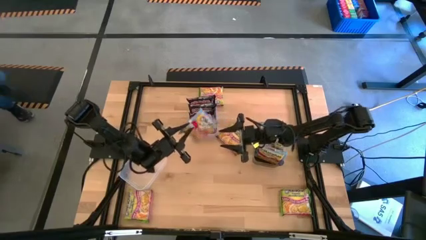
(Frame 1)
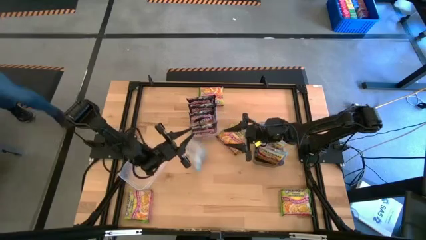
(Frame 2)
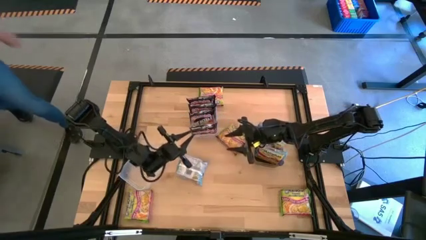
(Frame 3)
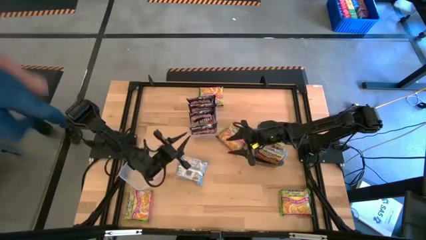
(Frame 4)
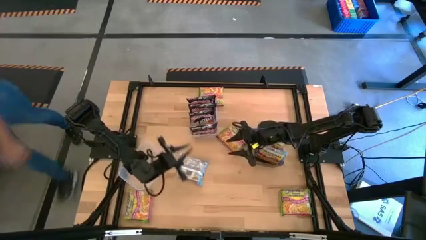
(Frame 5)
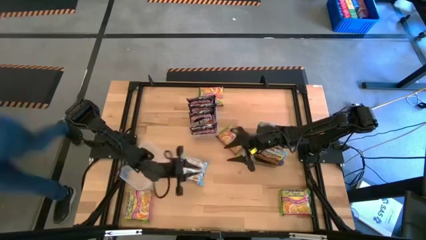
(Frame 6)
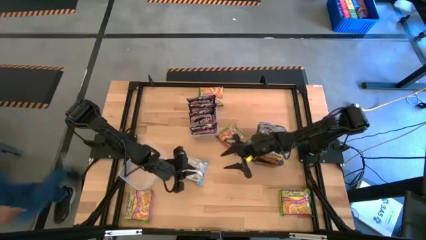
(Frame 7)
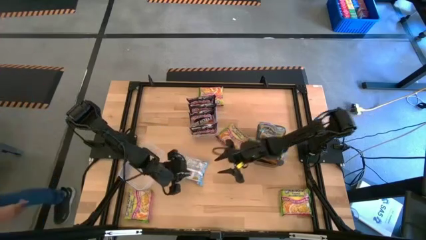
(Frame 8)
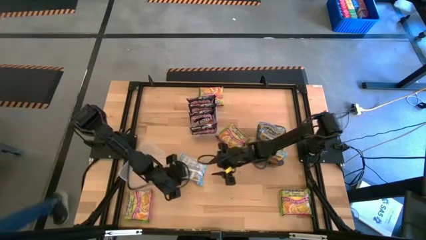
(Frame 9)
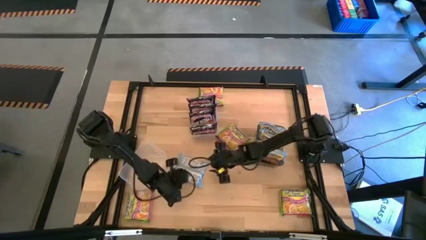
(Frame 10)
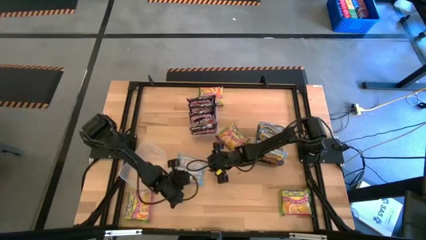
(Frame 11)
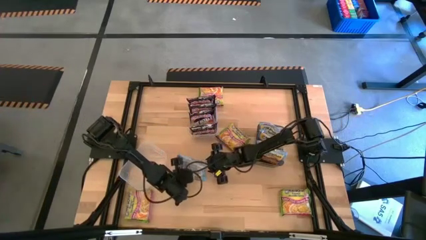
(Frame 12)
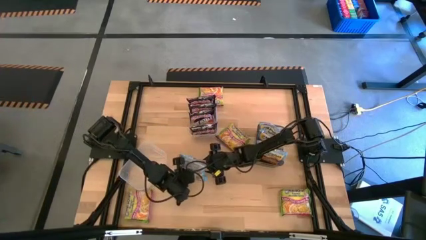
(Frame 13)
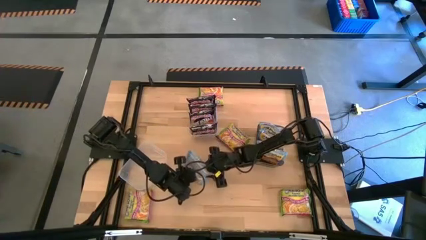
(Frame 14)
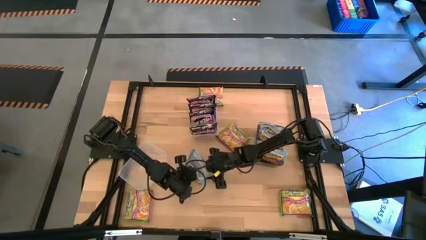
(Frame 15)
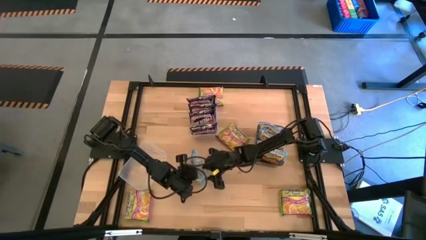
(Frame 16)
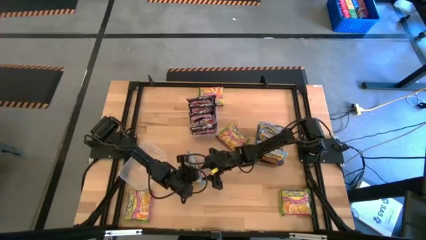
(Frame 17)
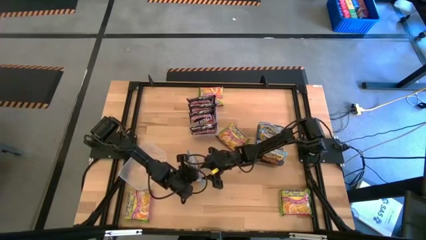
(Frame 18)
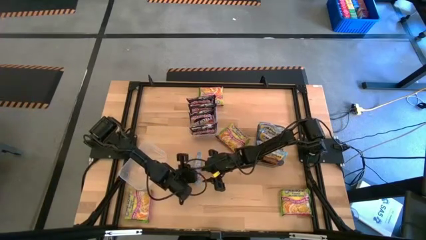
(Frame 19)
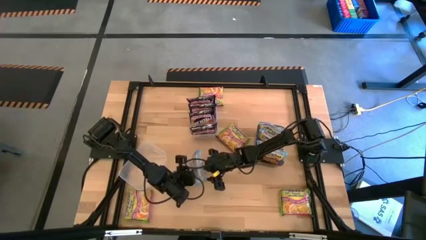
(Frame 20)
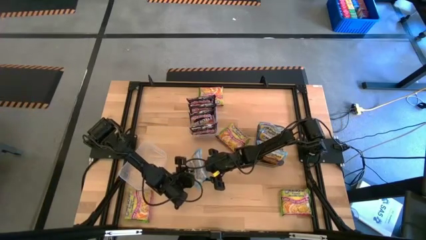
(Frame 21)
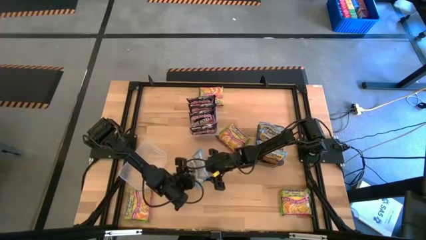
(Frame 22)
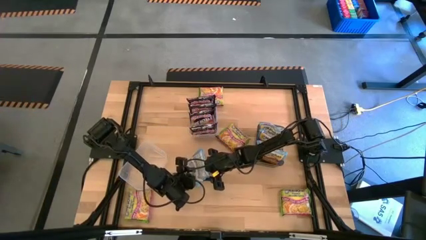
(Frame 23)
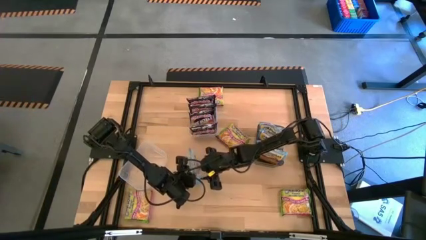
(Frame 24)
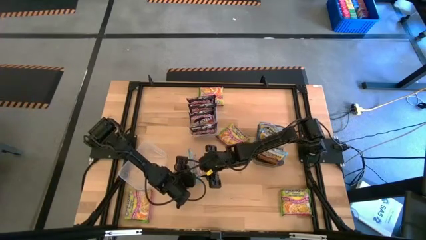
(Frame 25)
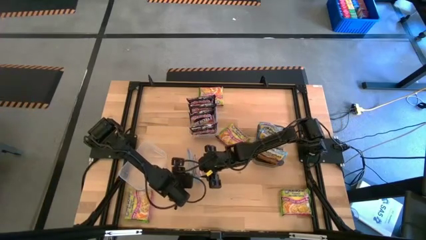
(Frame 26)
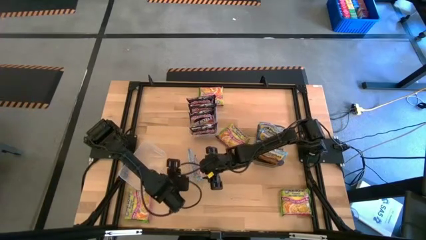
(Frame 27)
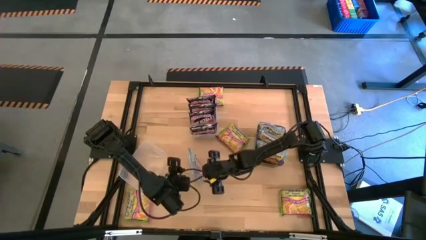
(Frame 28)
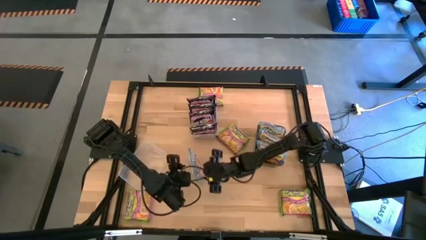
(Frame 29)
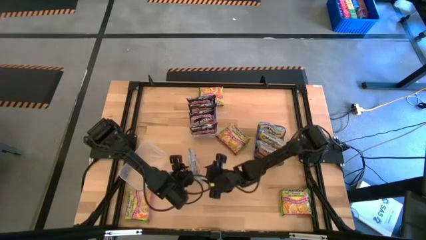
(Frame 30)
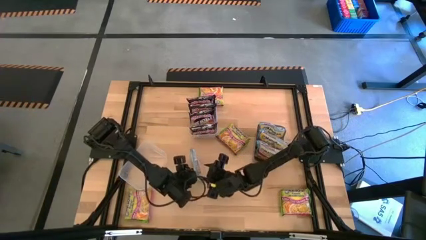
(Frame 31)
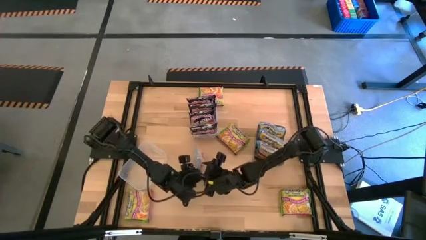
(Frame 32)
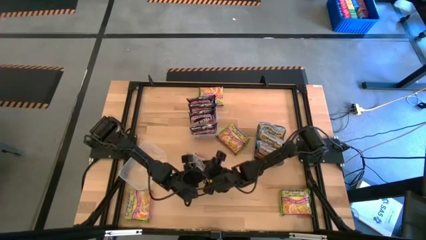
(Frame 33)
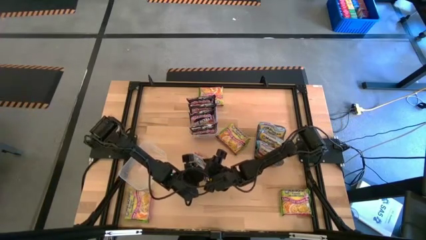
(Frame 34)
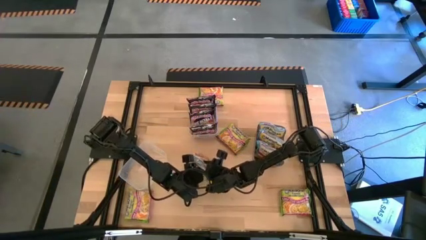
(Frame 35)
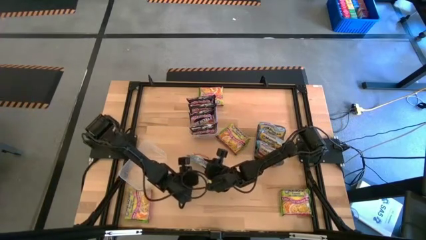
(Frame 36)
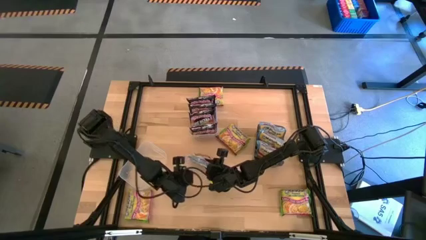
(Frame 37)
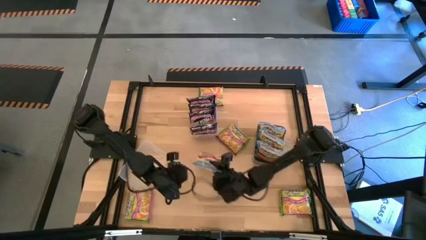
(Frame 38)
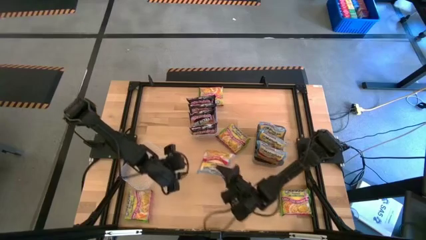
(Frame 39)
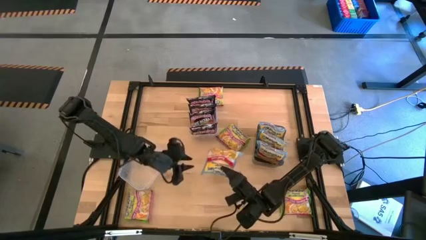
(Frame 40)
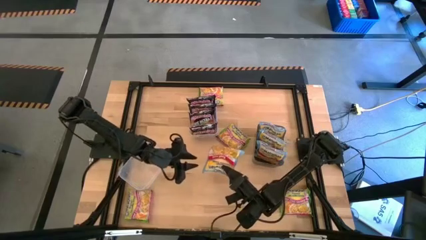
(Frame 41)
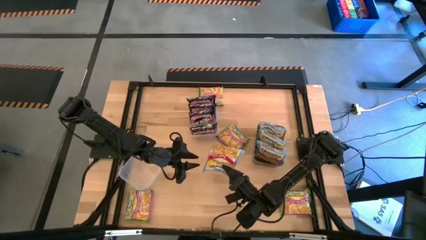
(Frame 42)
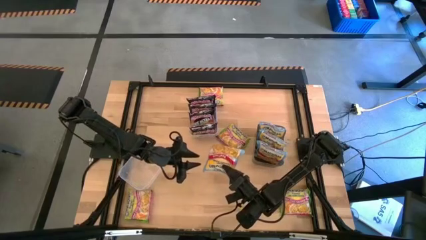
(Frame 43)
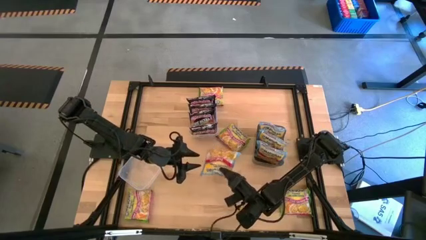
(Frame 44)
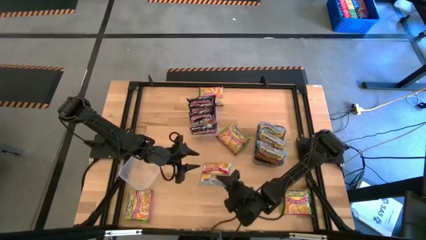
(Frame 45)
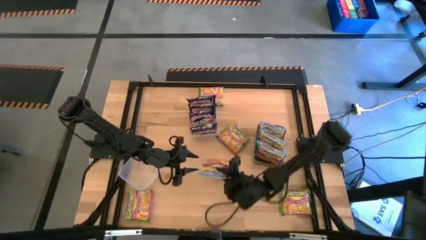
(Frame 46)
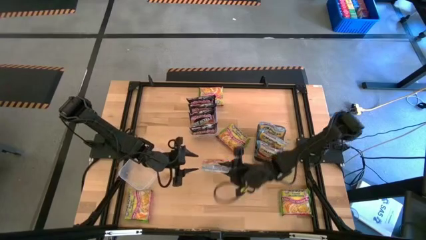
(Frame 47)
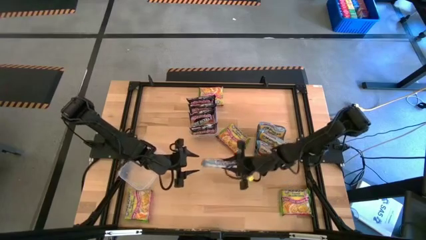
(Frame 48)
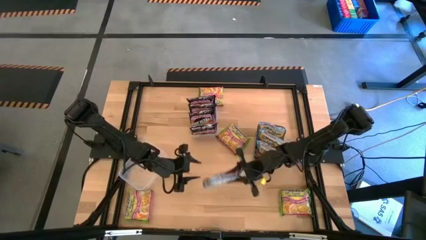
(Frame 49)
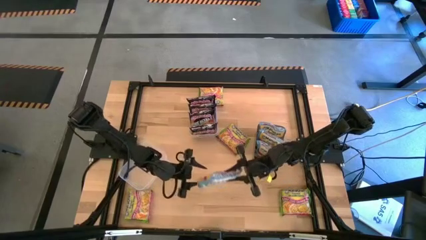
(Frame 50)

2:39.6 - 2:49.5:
Task: Sort Maruchan noodles
Put the blue noodle pack into the black bin

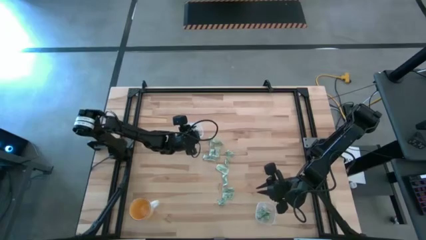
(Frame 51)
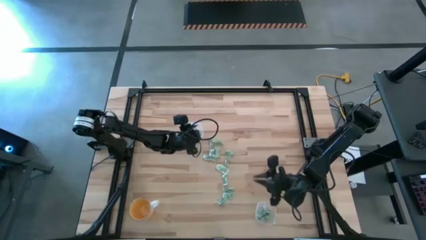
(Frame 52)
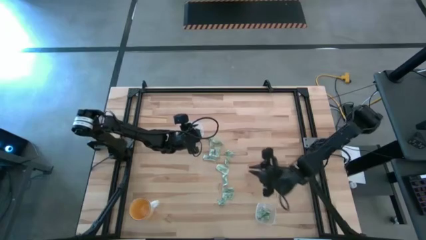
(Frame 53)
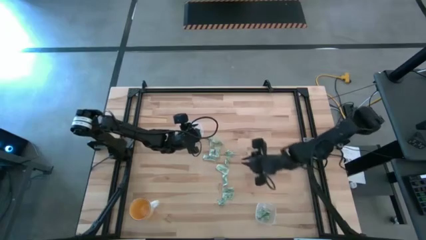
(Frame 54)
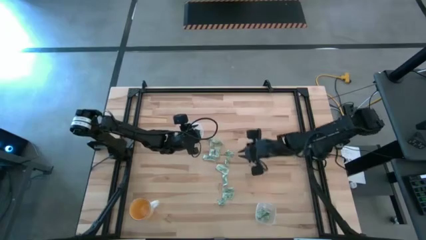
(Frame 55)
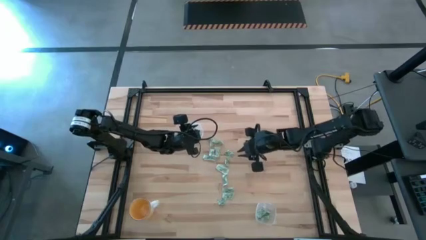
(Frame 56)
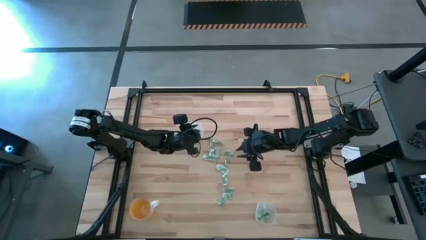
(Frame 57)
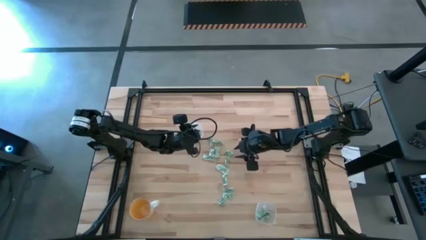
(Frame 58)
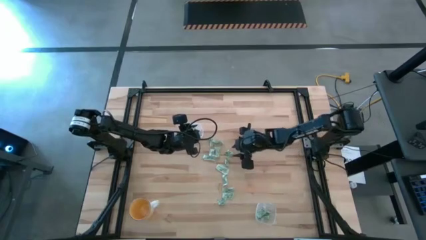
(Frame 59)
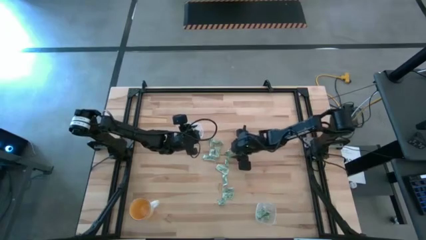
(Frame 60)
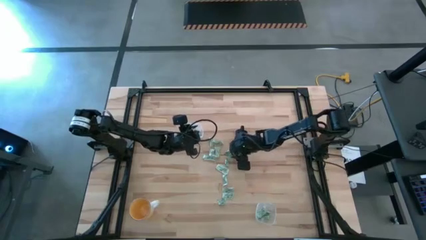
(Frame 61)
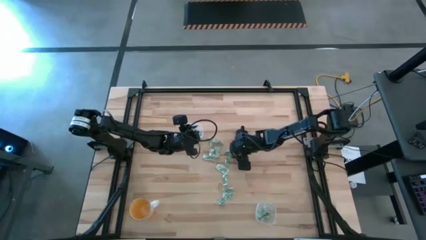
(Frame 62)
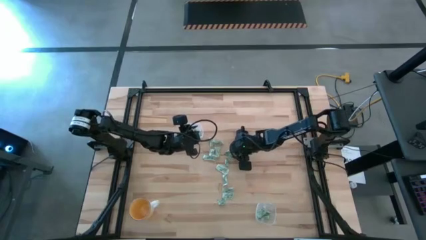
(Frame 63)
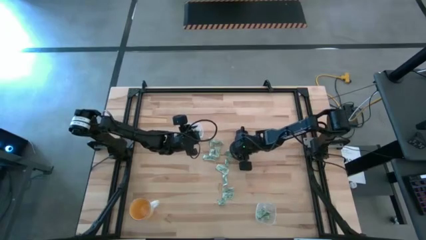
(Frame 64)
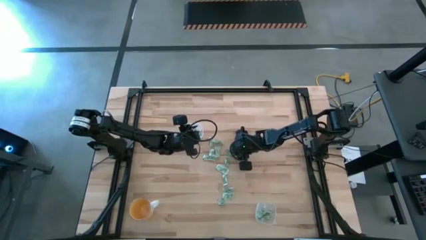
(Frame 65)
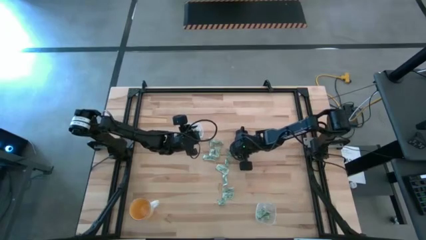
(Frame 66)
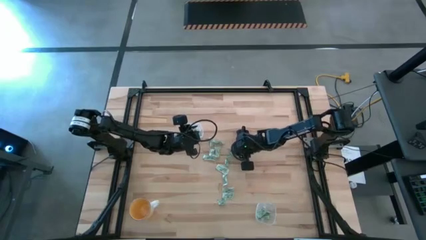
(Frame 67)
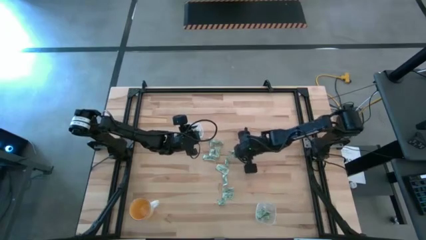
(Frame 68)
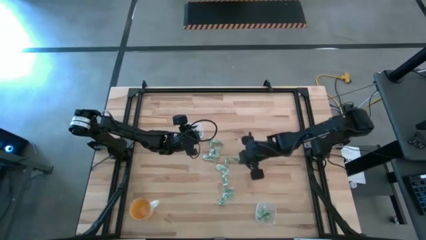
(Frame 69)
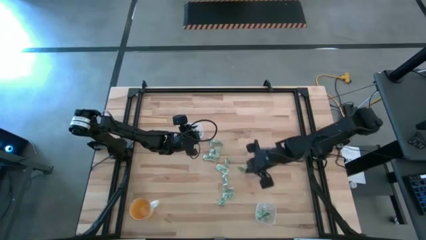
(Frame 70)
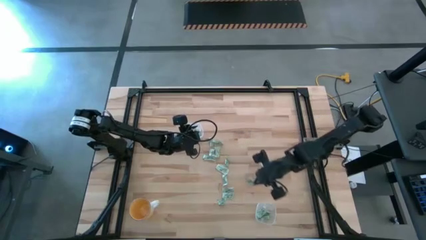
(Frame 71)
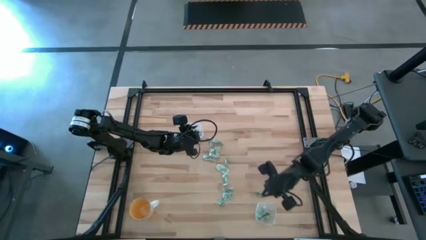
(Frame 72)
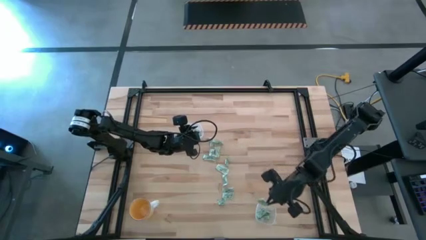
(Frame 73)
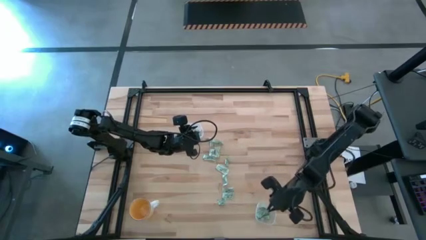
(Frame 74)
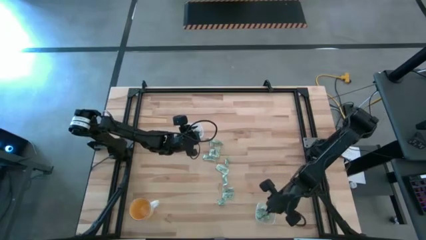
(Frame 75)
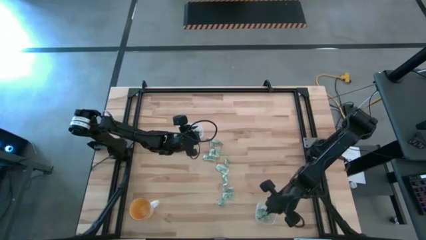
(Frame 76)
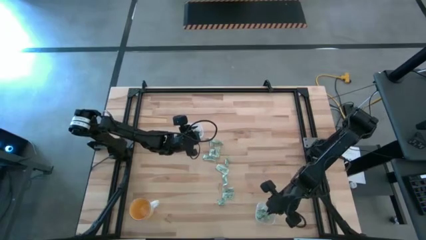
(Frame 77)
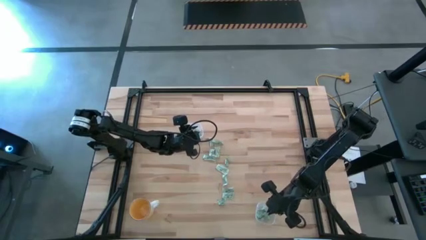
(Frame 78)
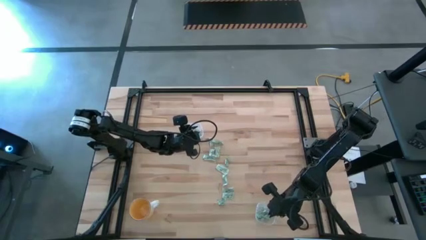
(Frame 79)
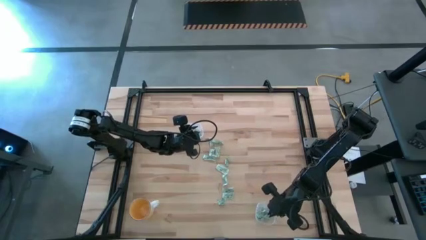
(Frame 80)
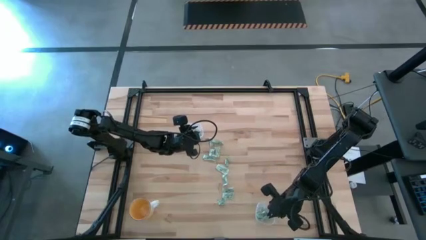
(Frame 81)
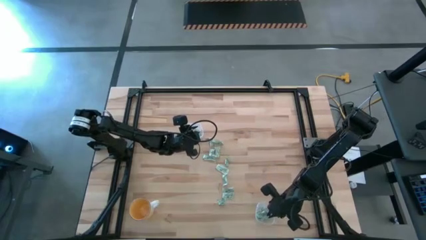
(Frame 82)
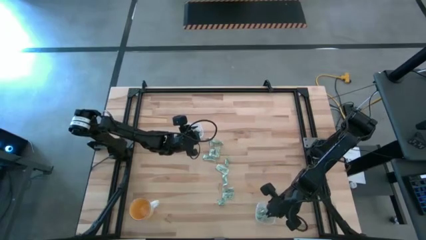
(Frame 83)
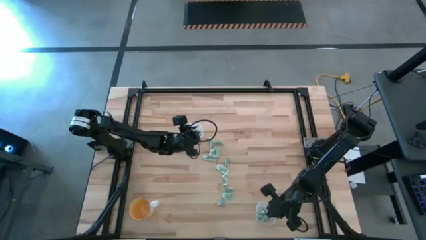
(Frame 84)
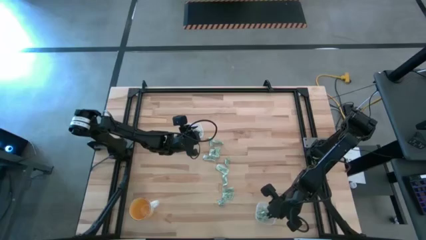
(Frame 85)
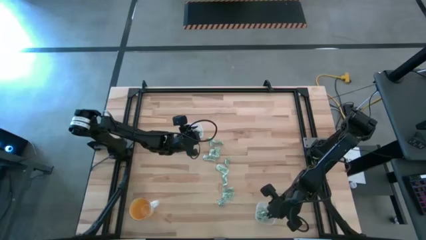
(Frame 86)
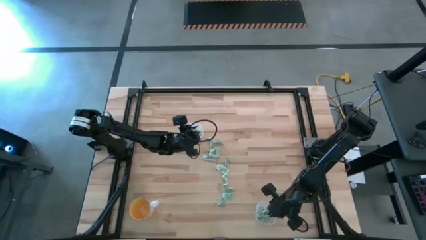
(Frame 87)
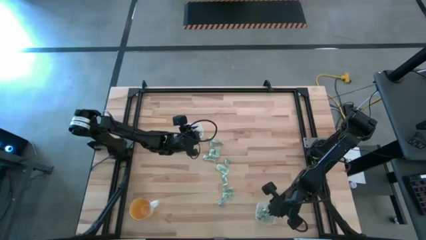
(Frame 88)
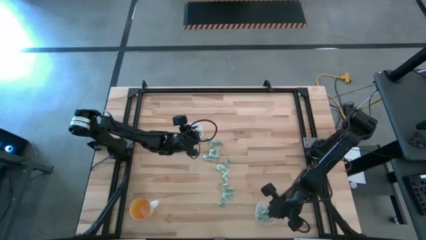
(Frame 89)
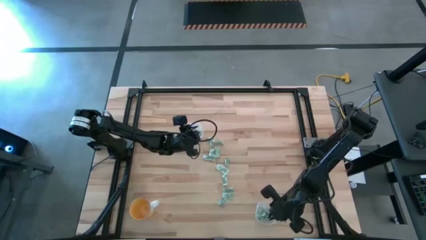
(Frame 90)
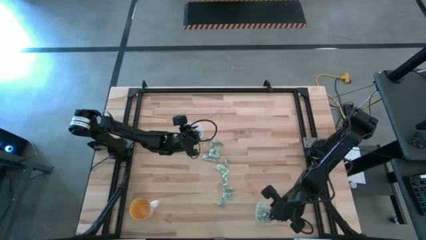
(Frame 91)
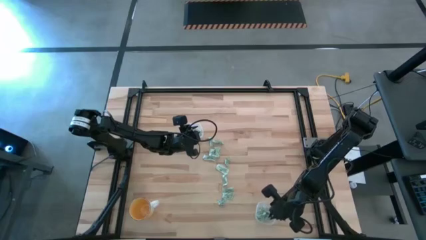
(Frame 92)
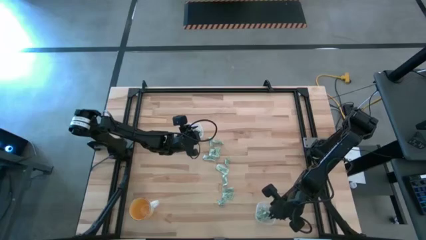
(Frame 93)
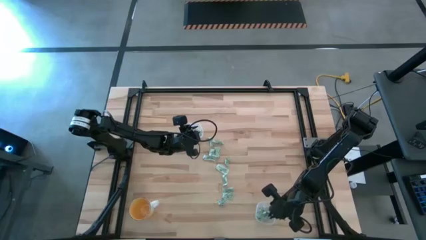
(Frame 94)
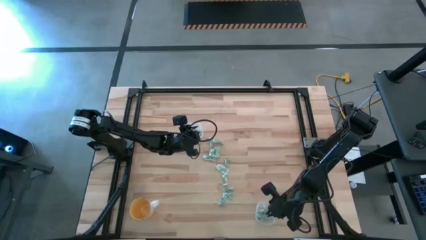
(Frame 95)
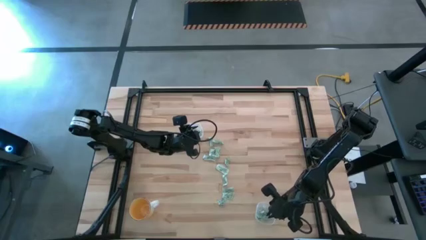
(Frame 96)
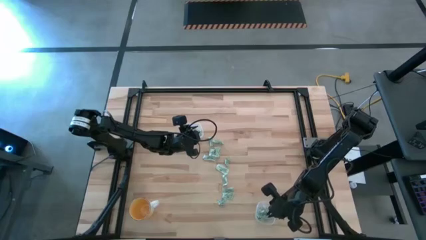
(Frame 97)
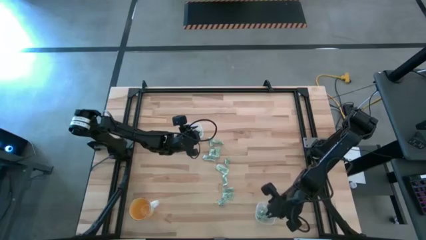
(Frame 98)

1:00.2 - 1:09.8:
Task: Pick and place Stevia / Truvia into bins
Put the stevia packet into the bottom transparent container
